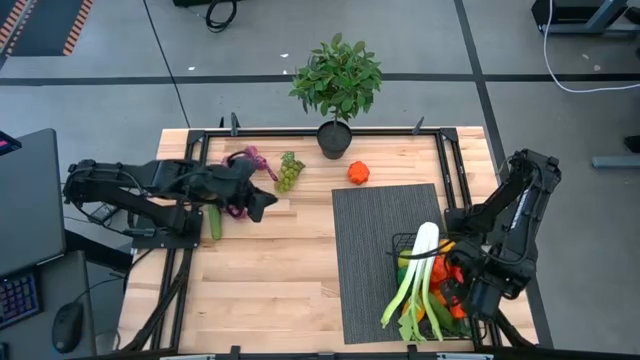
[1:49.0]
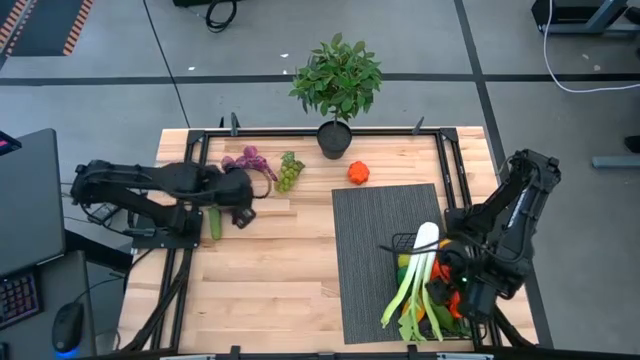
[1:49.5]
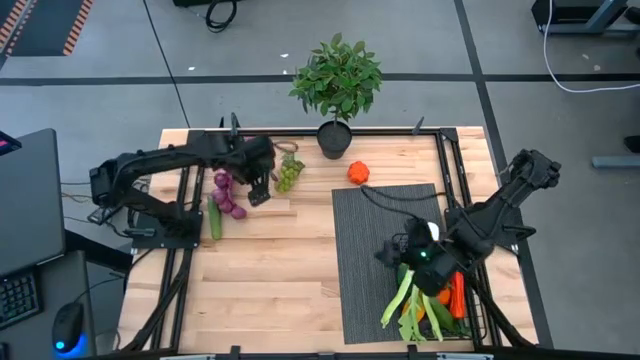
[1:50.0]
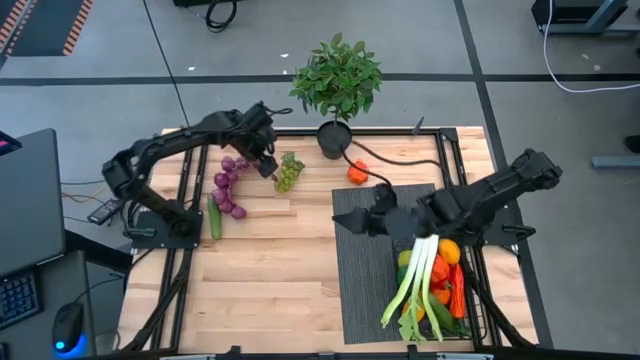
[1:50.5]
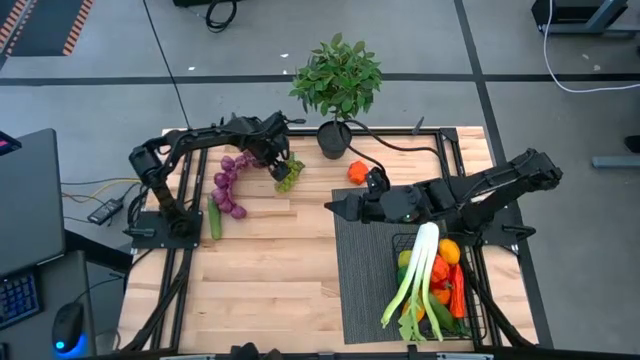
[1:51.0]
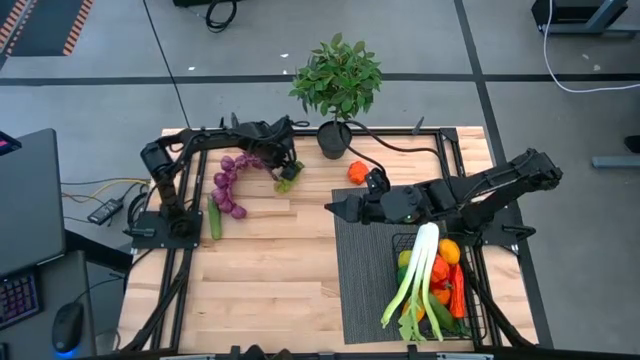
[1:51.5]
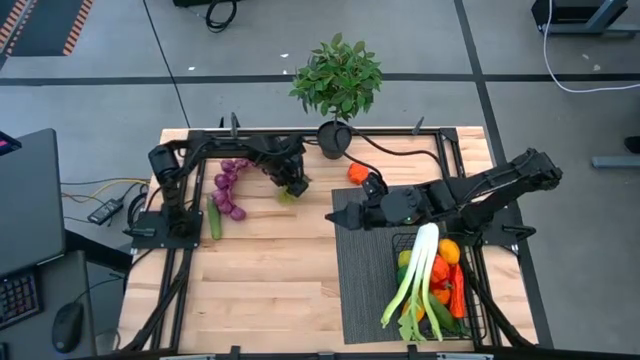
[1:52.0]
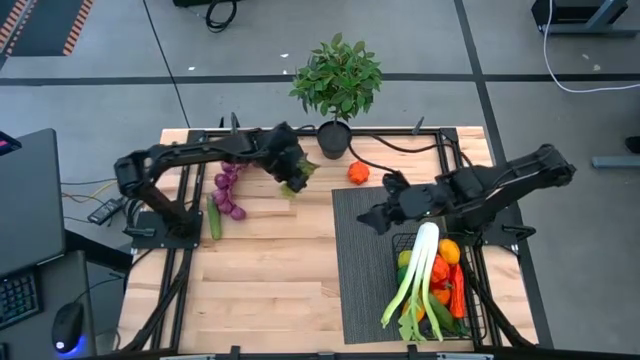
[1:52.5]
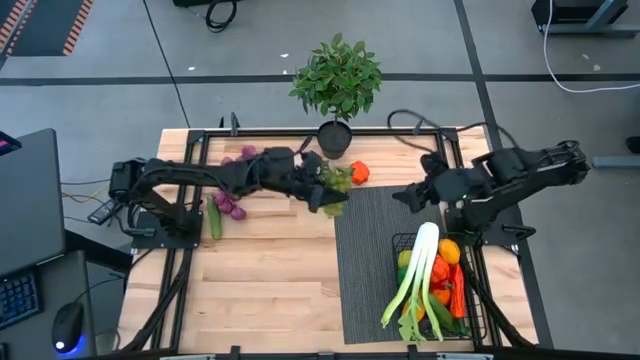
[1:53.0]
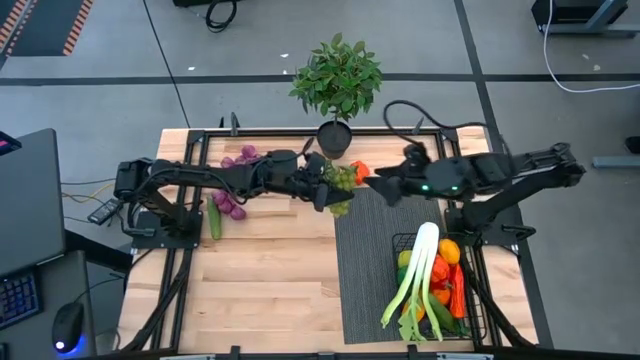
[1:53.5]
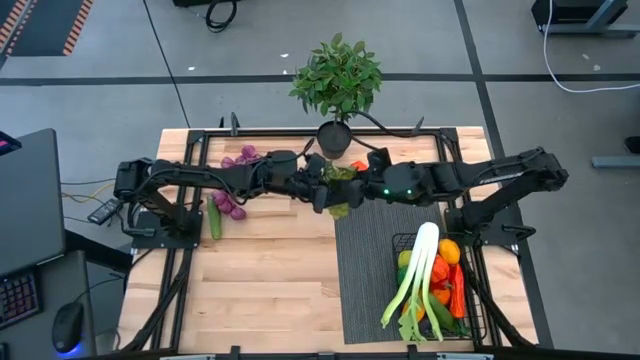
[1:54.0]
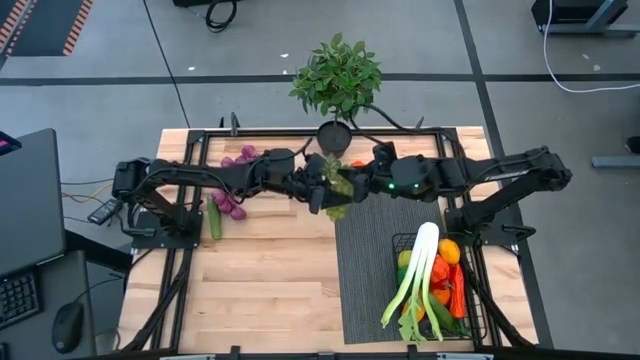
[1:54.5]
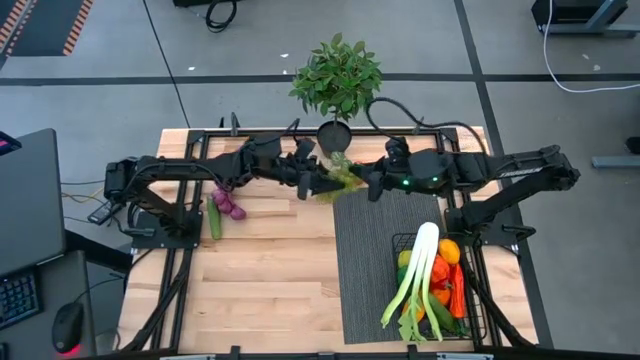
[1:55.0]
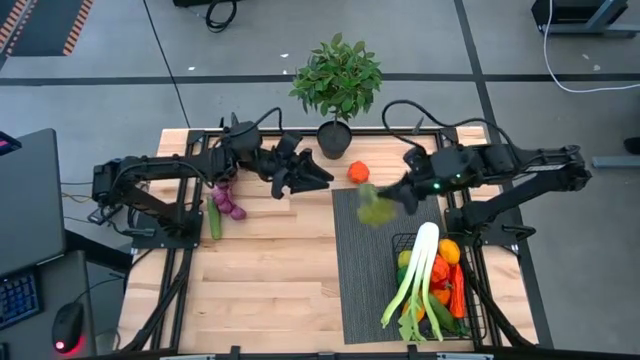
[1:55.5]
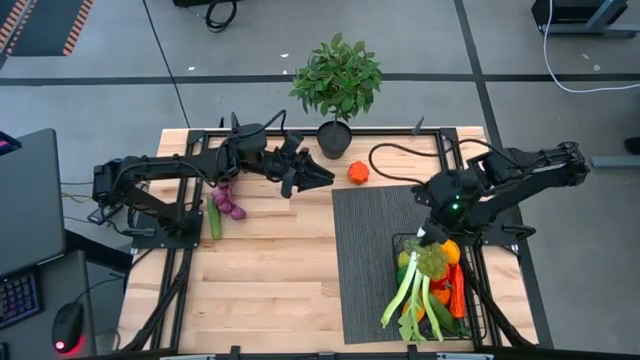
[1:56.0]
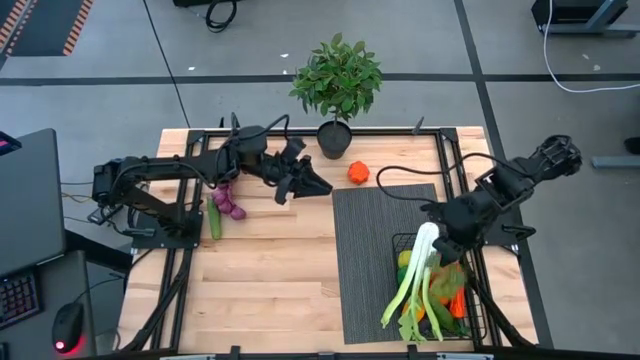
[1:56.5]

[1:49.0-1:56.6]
Task: Build produce basket
Put the grapes into the black wire basket

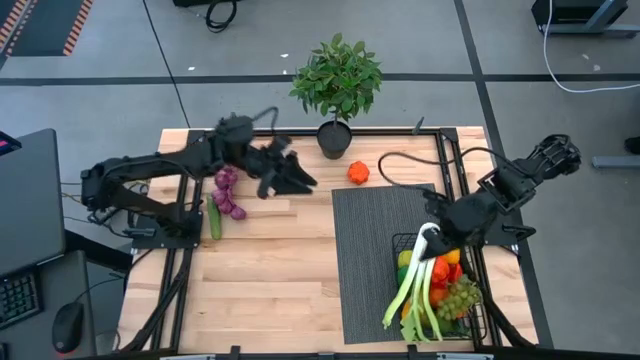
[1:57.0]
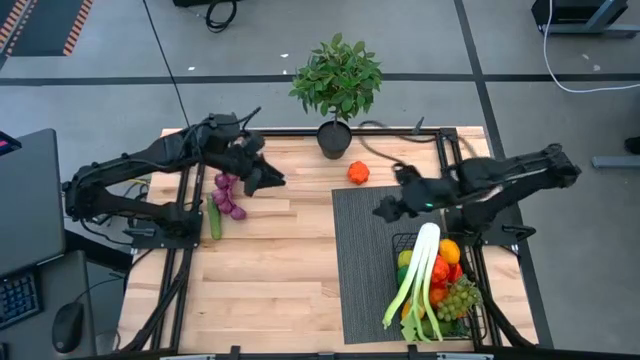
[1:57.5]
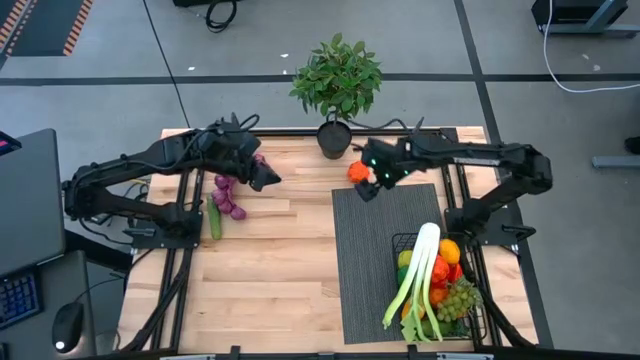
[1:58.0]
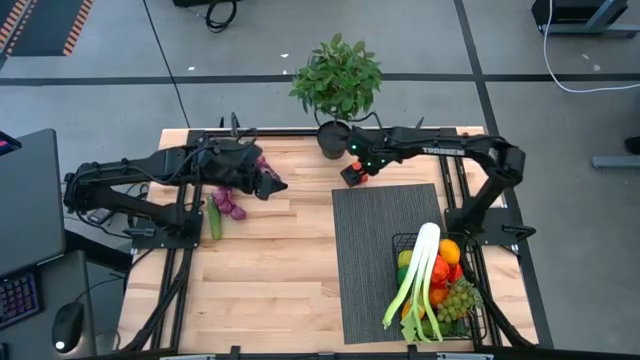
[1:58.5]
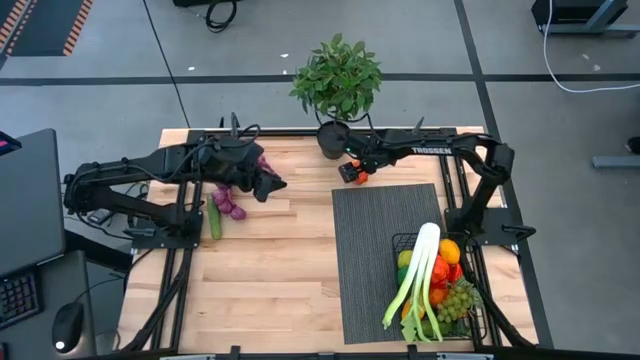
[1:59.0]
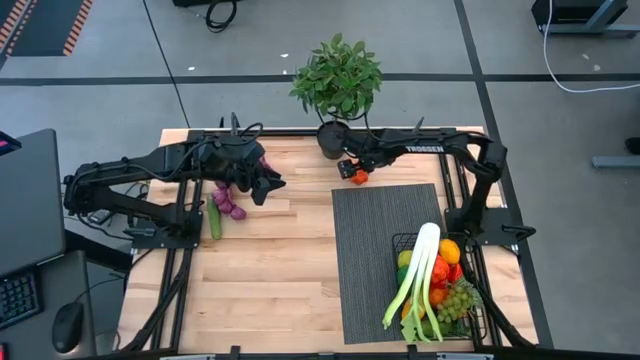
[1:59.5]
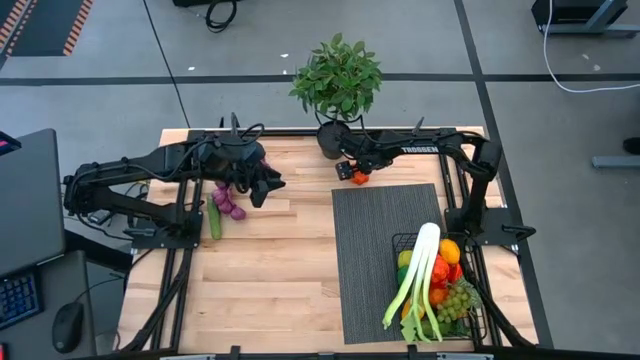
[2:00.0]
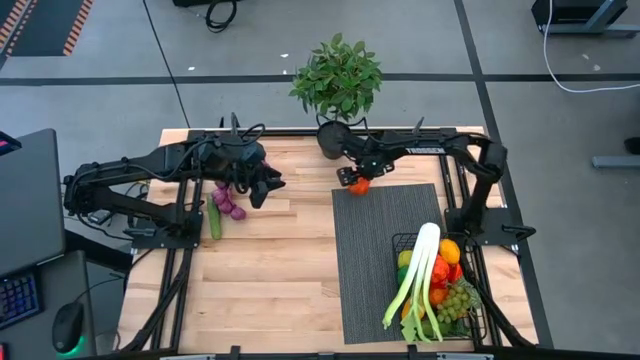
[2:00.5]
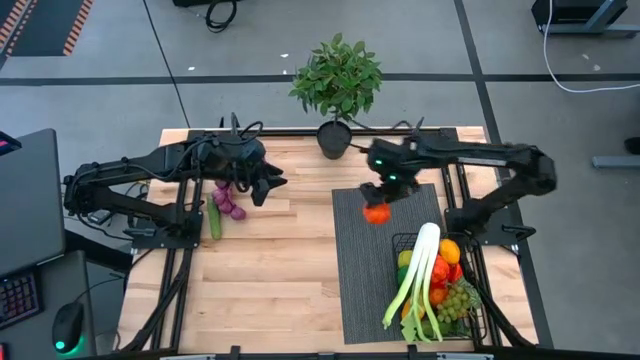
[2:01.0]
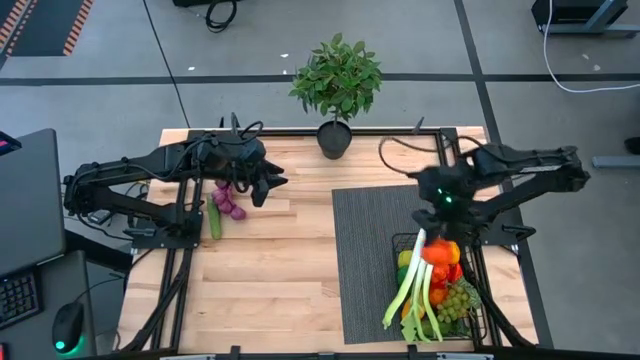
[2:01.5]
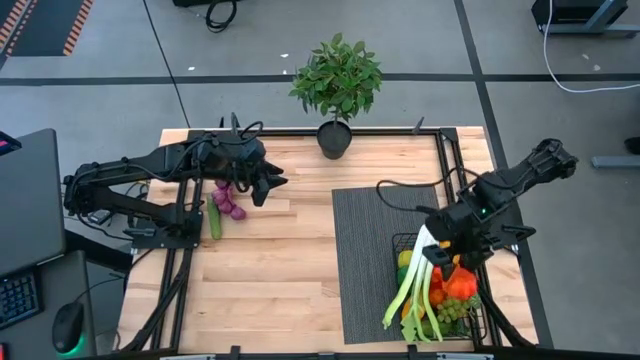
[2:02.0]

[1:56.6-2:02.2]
Put the squash into the black wire basket

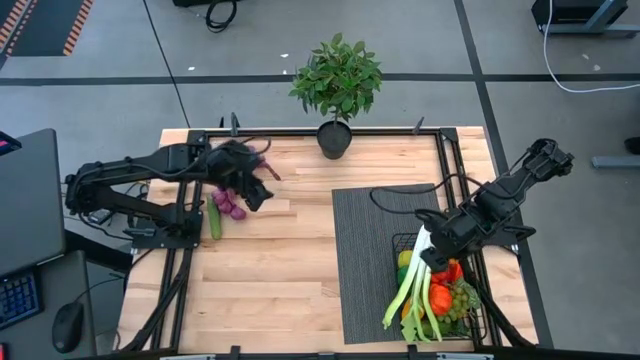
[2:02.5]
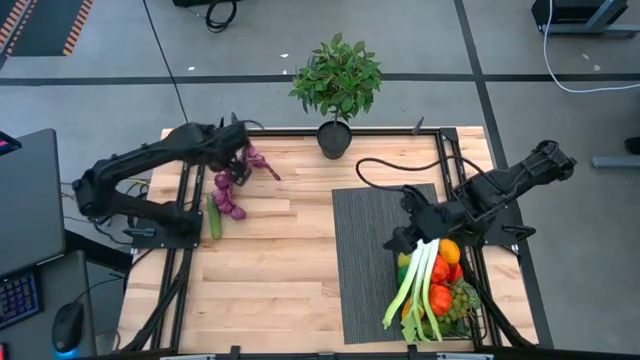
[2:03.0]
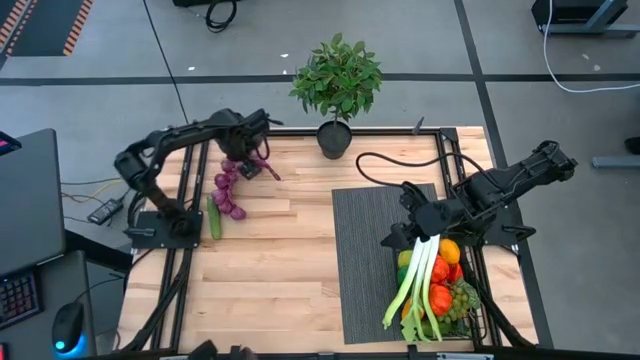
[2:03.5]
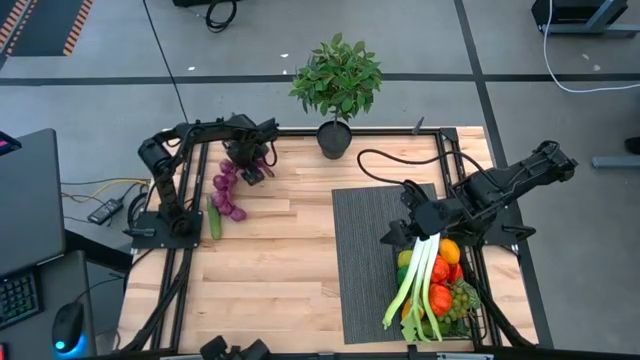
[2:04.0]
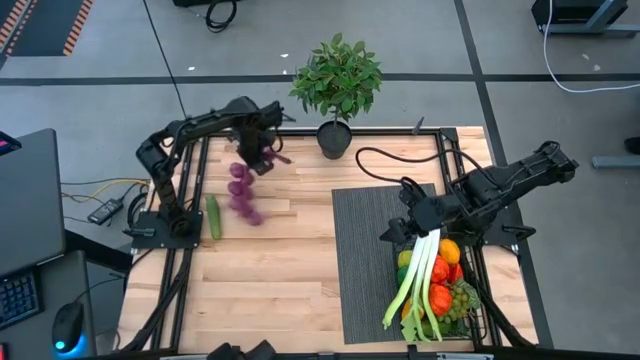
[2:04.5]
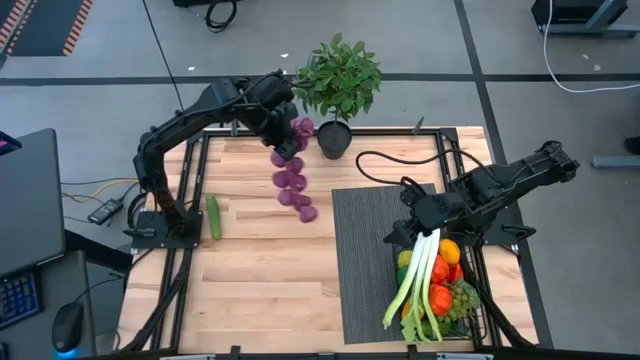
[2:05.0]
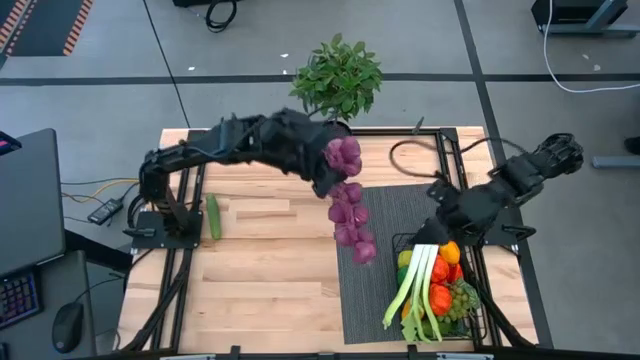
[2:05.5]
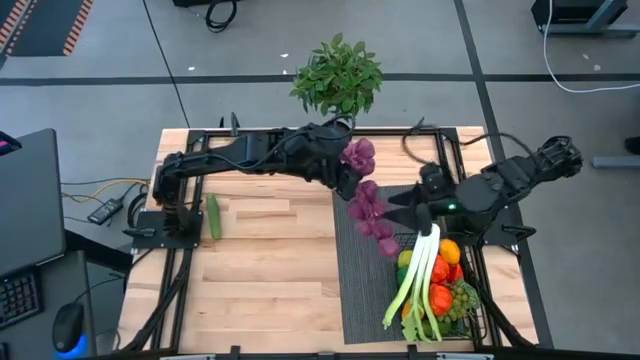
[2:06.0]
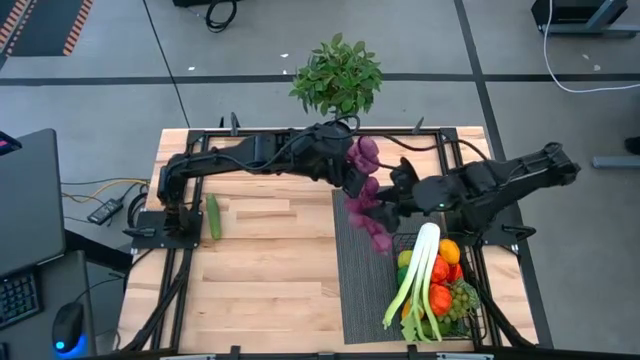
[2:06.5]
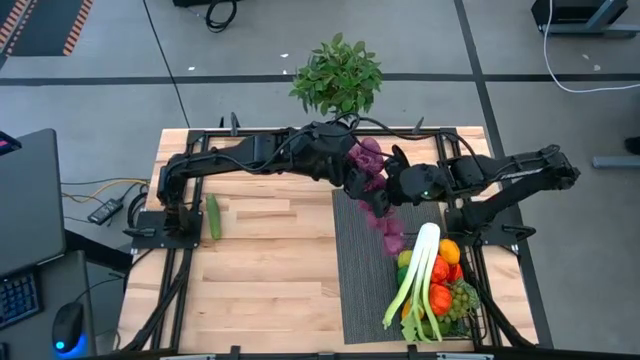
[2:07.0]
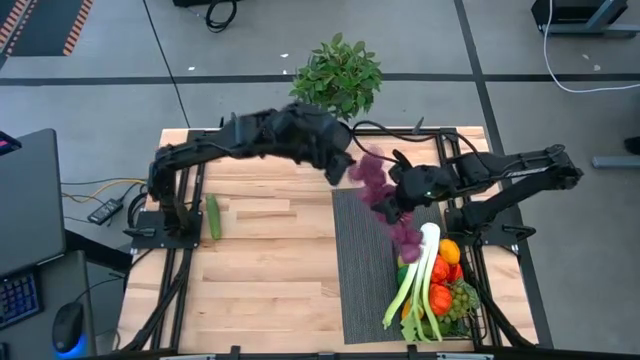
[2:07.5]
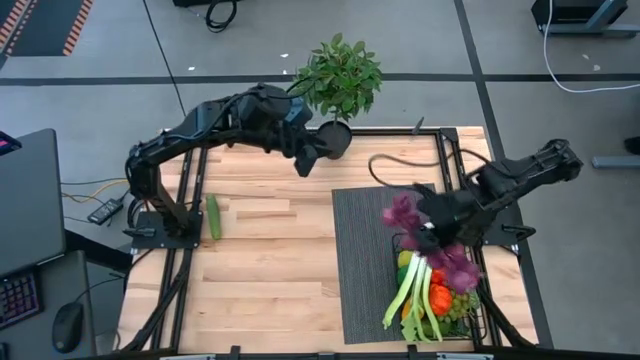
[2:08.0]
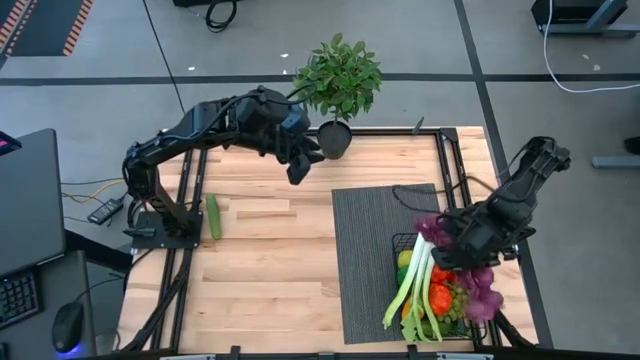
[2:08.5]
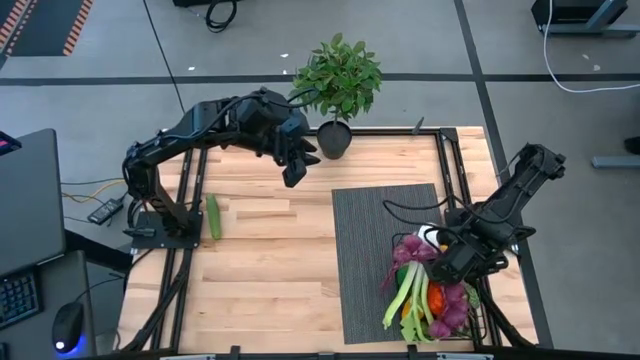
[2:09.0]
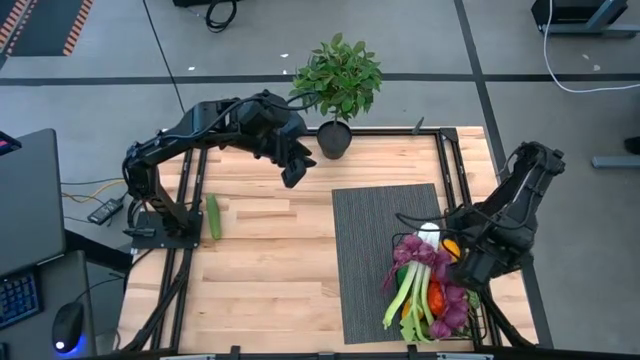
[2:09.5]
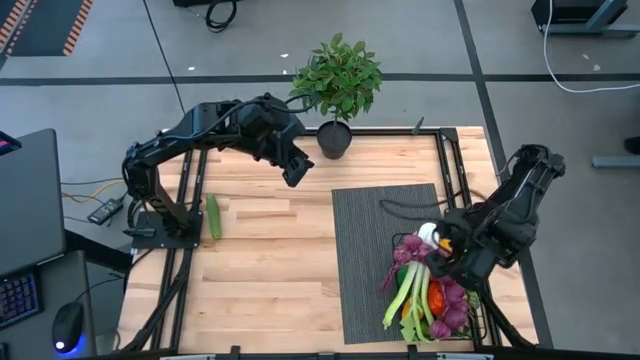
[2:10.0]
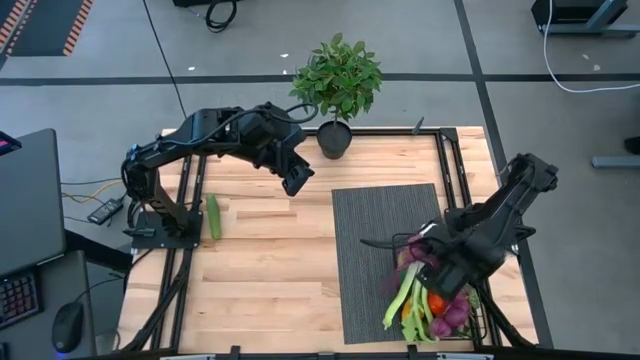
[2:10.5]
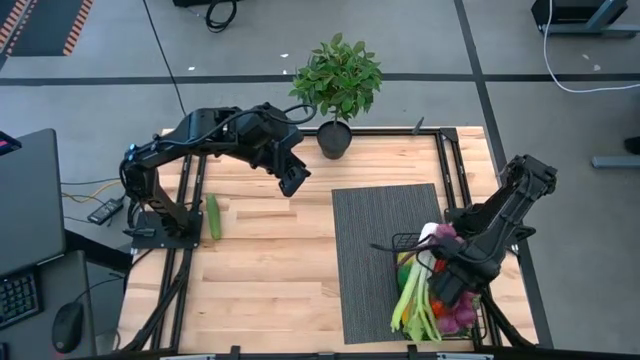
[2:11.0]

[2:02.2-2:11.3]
Put the purple garlics into the black wire basket
